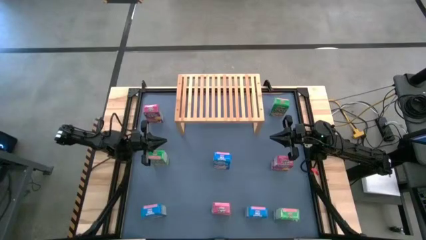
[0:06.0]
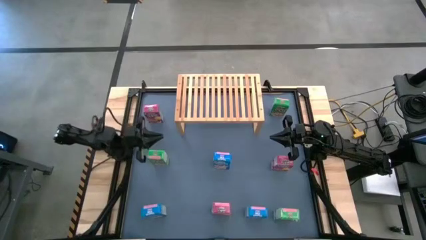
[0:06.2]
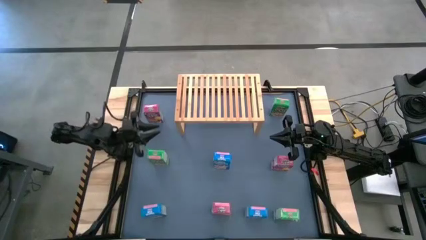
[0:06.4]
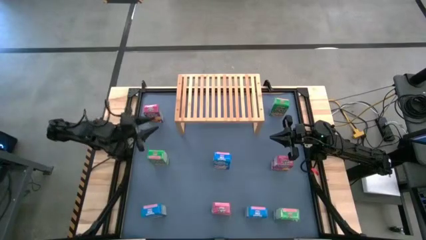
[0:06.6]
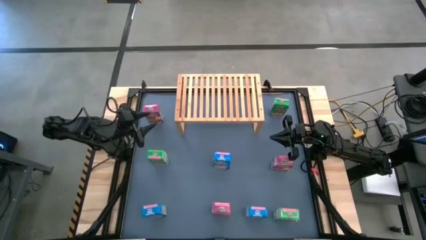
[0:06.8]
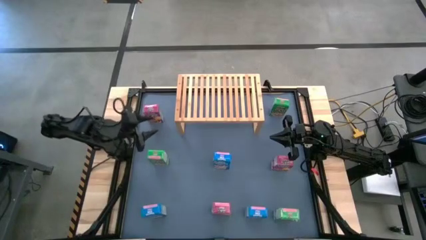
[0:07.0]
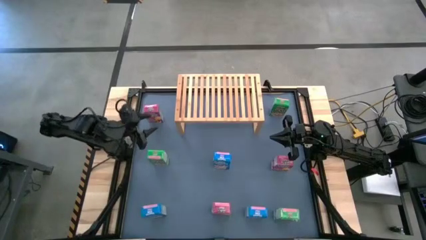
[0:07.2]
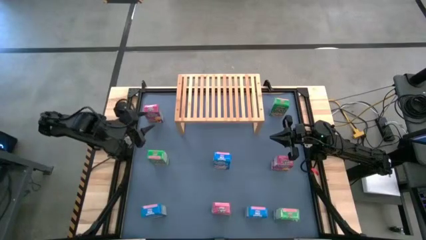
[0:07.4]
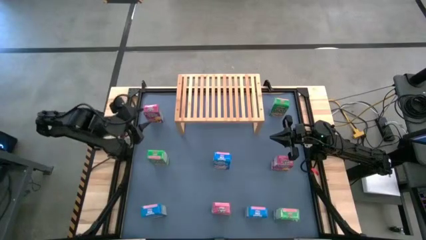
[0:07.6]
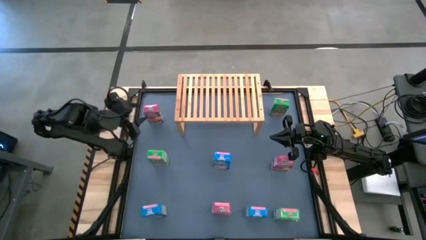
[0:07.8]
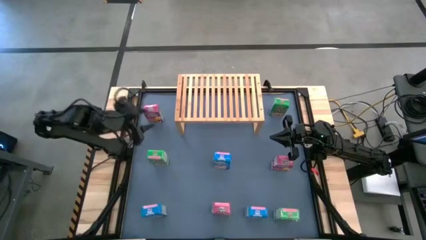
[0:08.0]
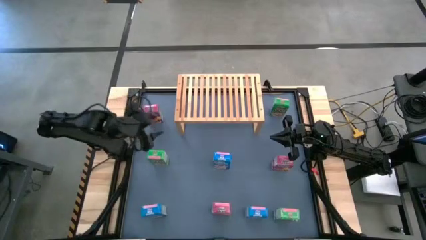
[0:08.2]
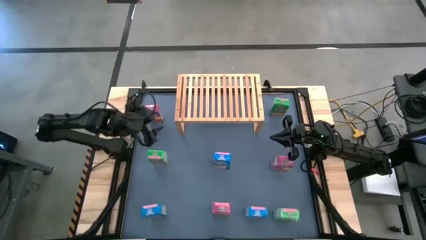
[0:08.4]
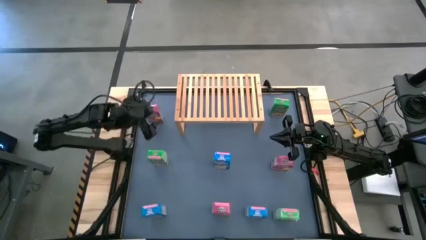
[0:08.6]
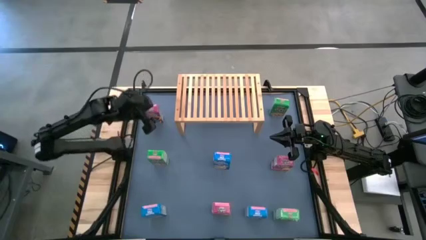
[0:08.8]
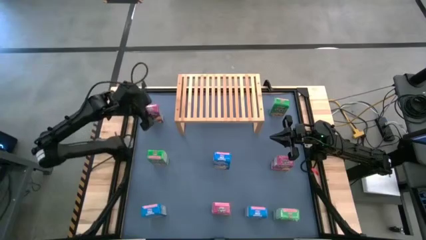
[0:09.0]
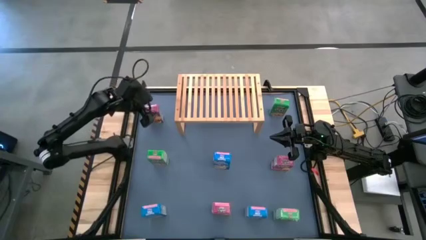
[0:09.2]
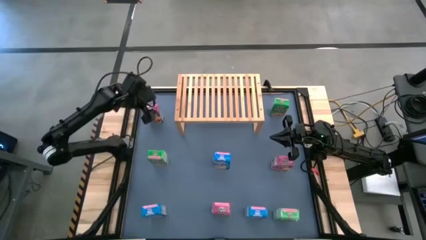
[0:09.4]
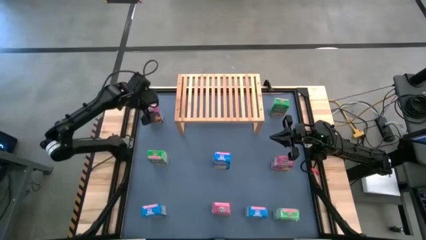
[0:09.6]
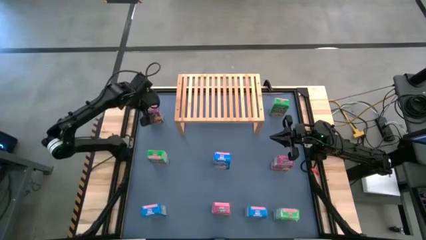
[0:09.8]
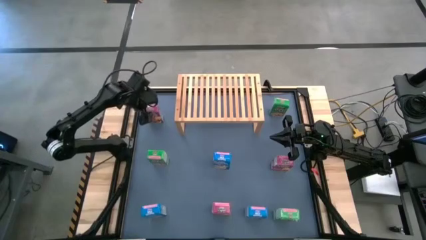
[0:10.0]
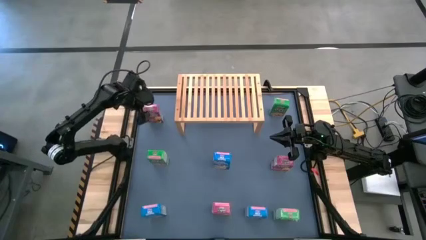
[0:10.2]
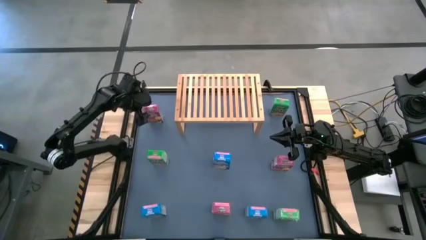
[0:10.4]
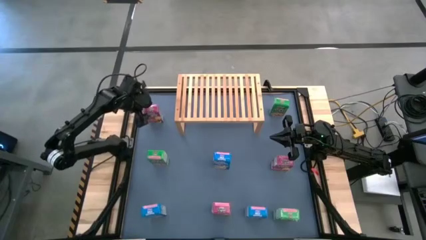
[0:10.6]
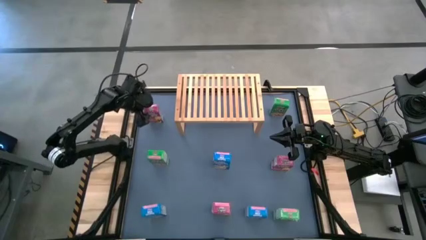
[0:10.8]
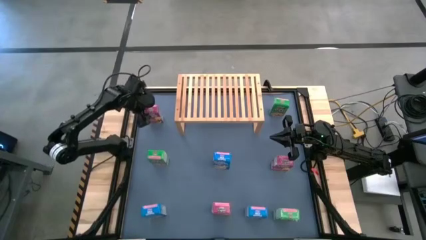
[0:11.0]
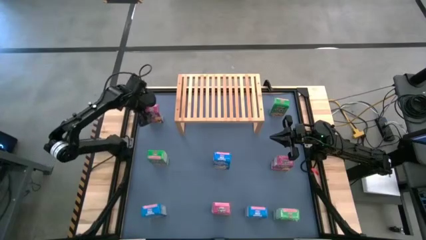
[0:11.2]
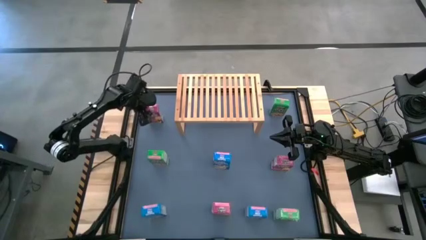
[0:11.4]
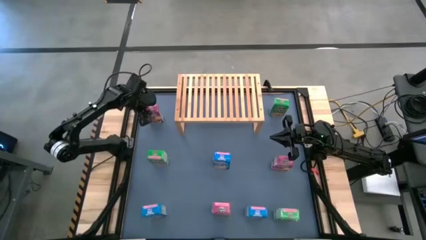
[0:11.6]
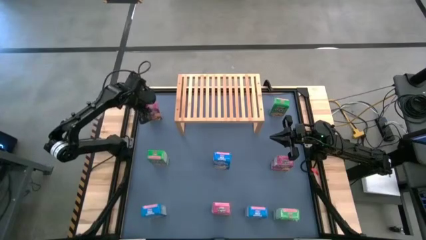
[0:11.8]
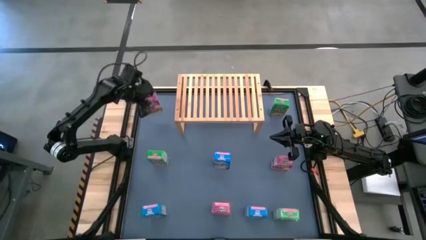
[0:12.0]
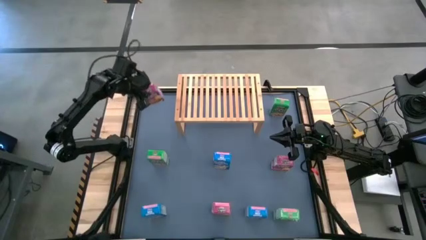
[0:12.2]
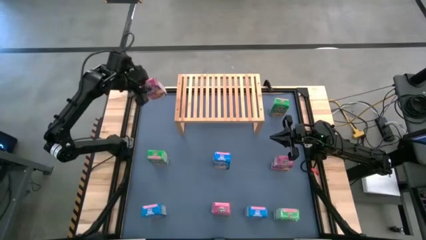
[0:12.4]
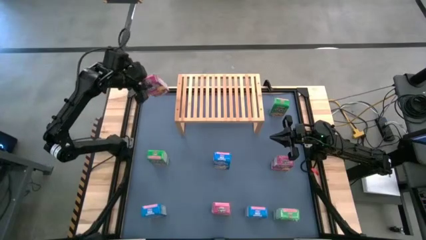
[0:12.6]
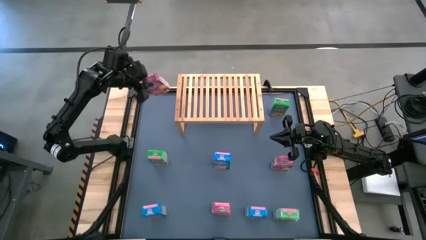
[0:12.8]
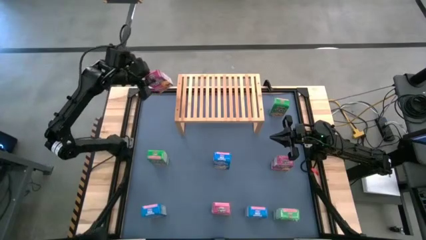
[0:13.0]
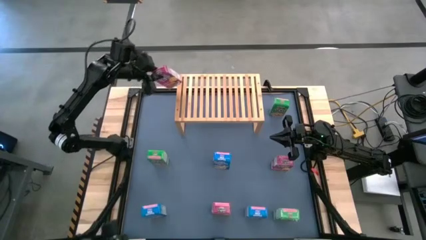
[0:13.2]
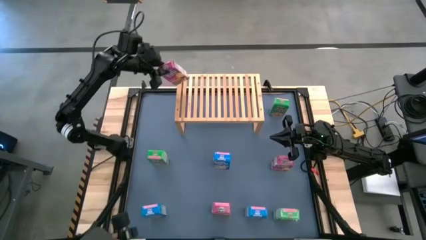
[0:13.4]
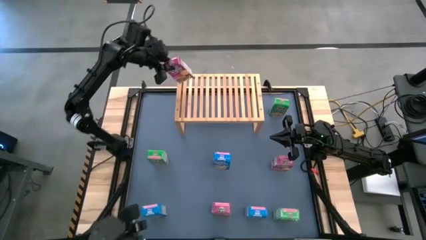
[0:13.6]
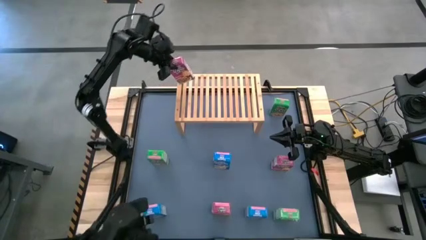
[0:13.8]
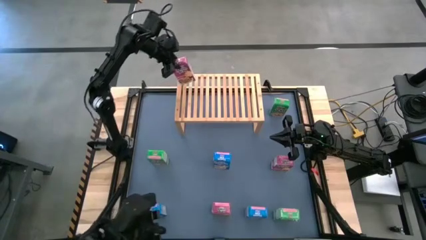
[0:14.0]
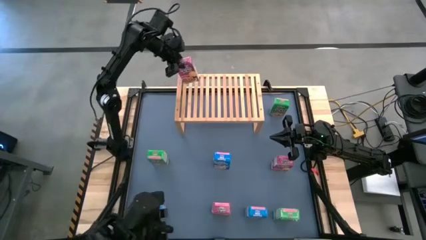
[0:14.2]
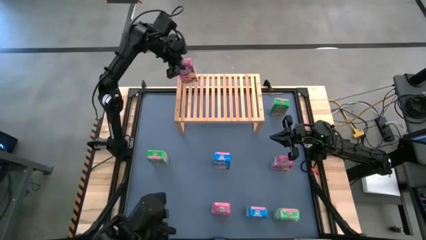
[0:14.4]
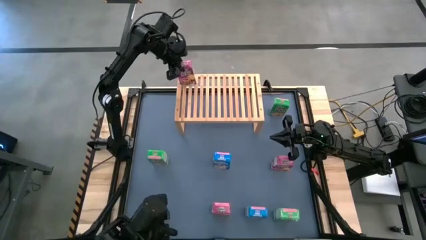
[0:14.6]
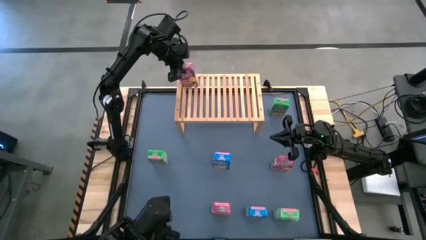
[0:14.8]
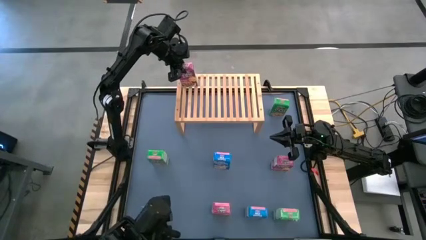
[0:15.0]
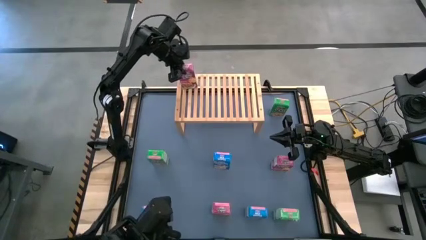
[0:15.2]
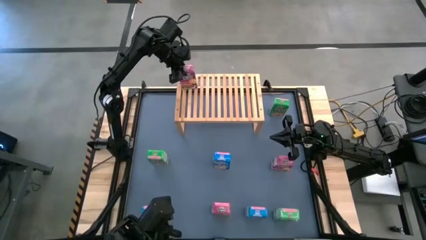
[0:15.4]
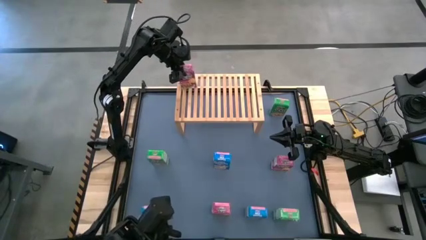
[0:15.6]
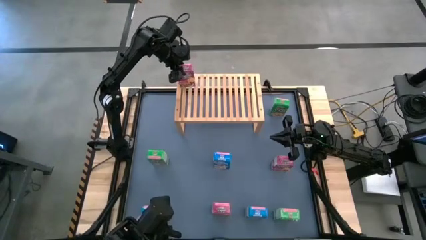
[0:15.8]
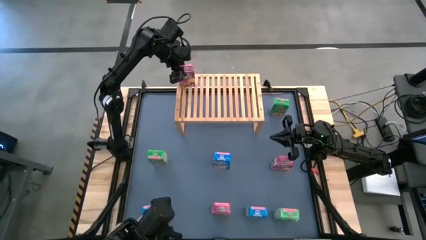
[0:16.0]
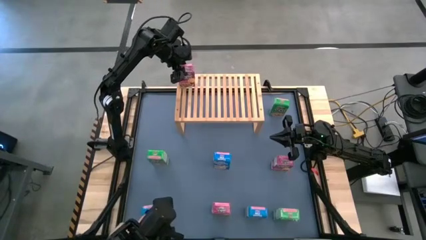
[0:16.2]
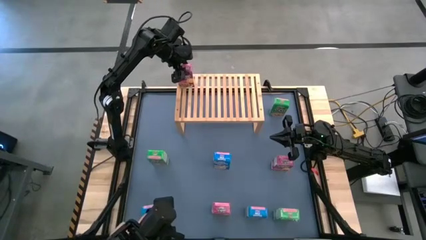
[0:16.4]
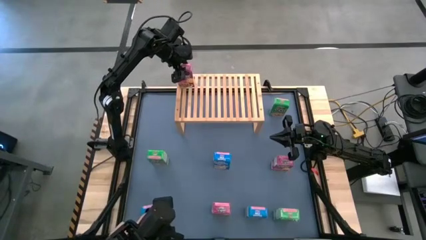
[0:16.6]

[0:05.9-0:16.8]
Task: Stack cereal on shelf
Put the top left purple cereal box on the shelf
